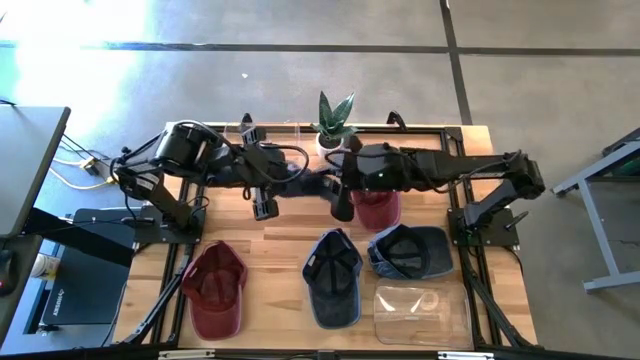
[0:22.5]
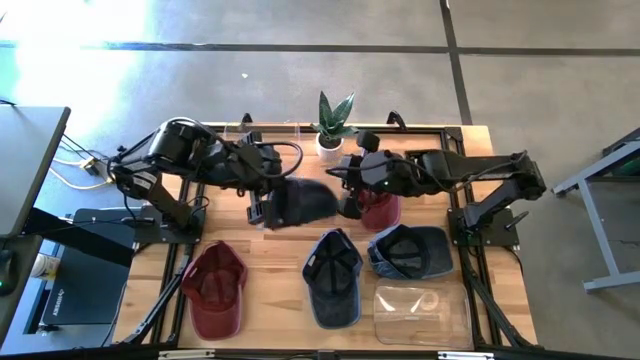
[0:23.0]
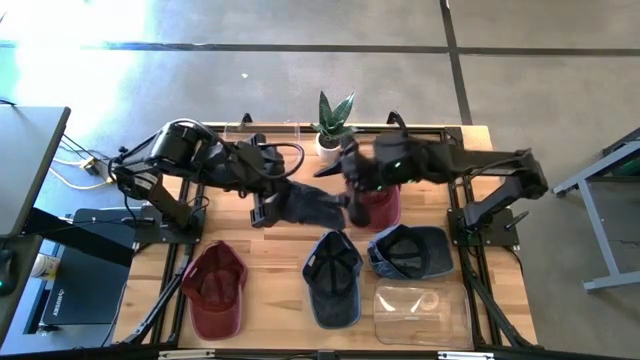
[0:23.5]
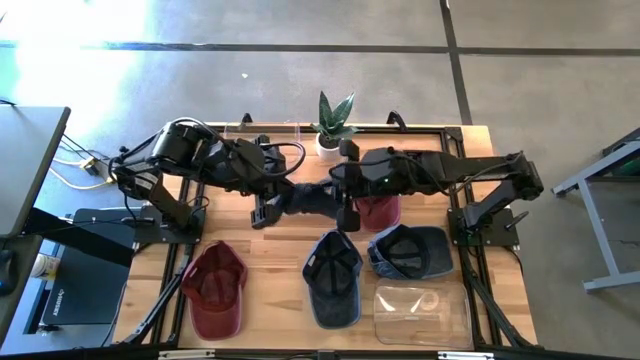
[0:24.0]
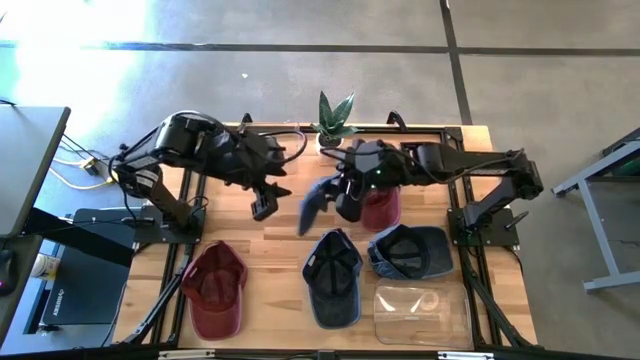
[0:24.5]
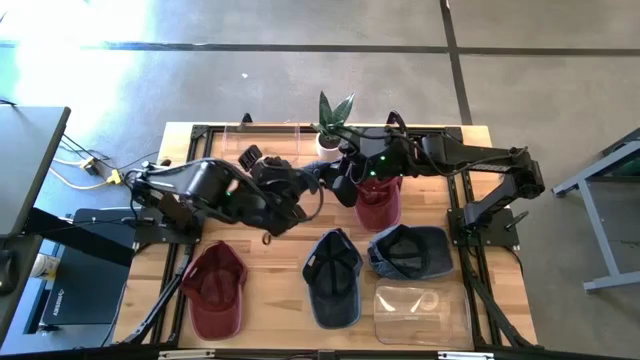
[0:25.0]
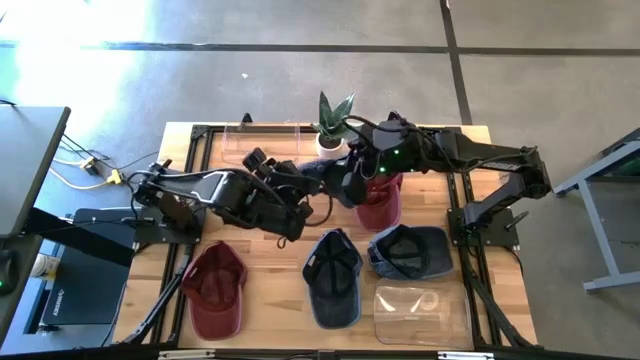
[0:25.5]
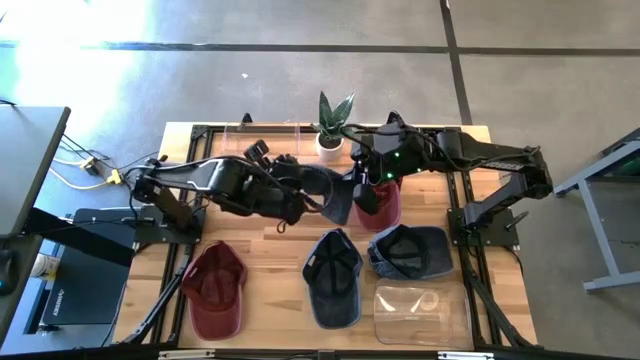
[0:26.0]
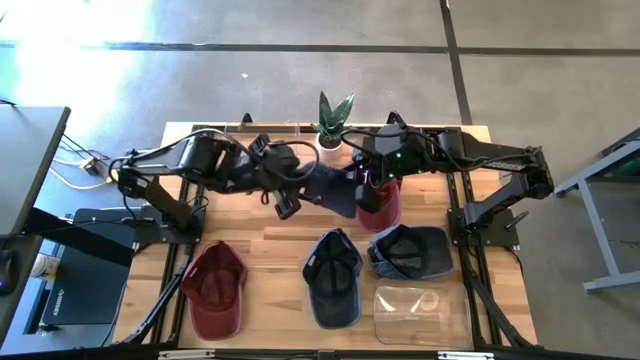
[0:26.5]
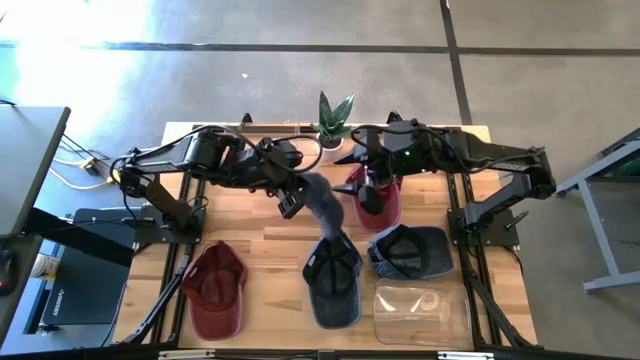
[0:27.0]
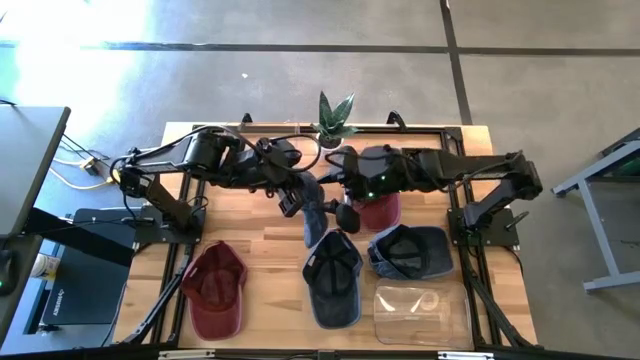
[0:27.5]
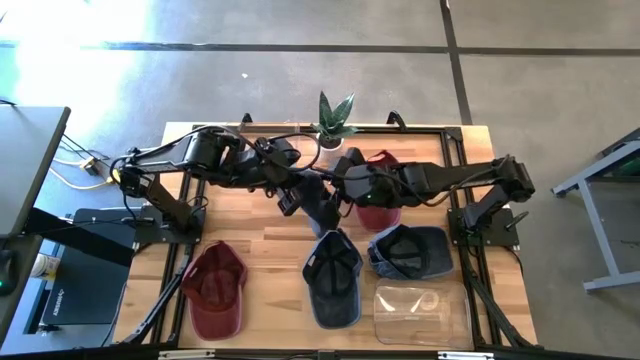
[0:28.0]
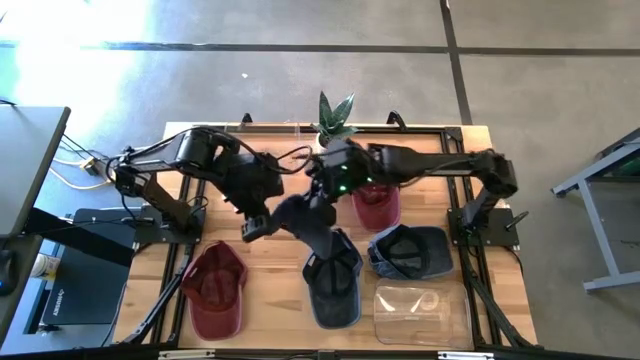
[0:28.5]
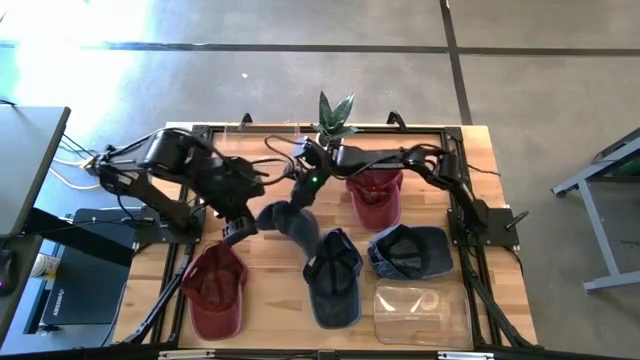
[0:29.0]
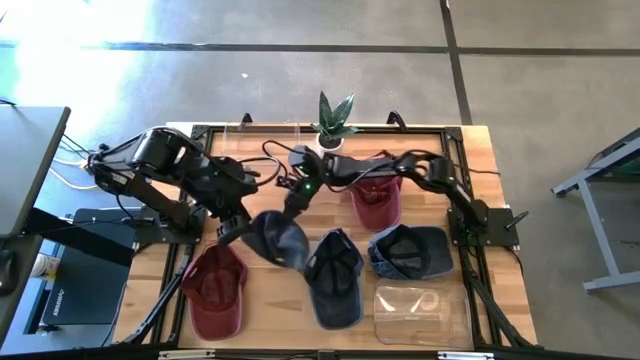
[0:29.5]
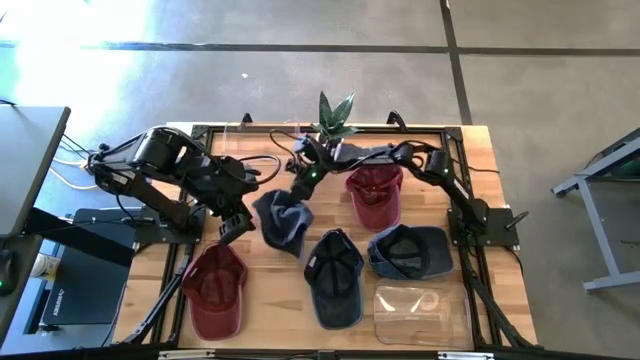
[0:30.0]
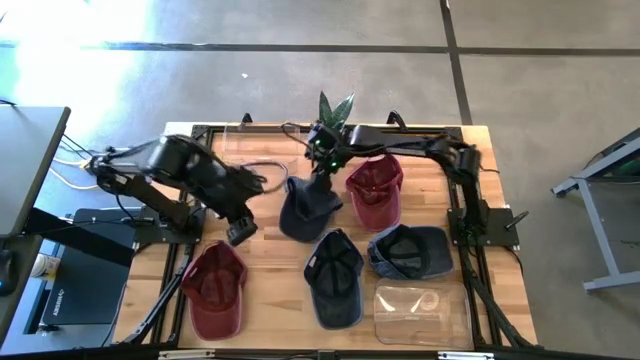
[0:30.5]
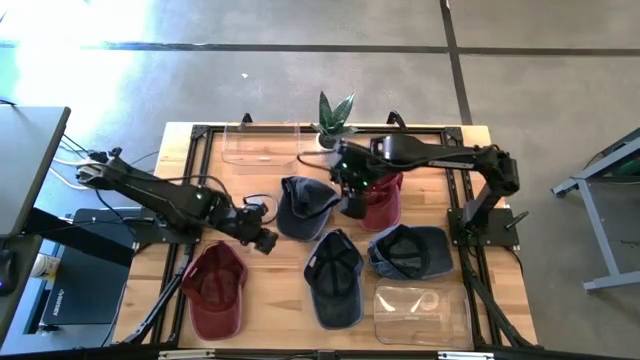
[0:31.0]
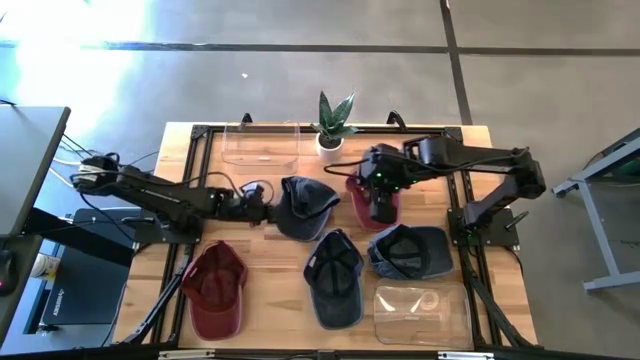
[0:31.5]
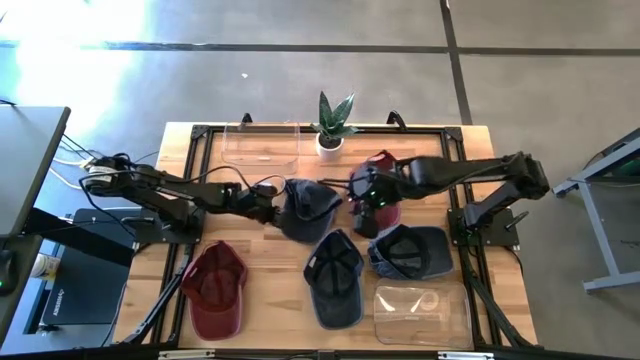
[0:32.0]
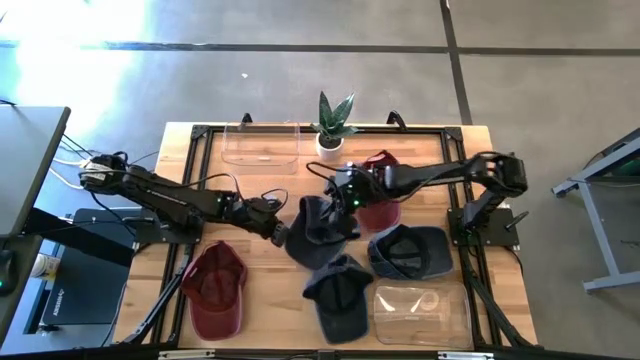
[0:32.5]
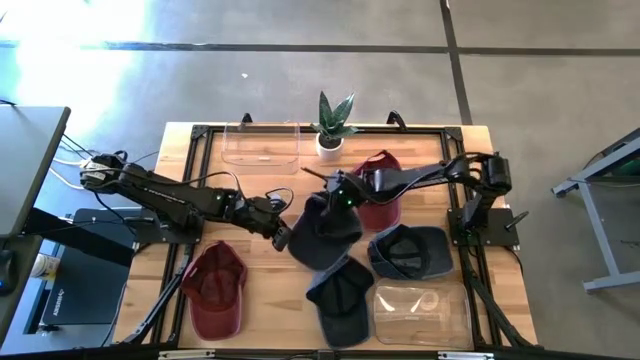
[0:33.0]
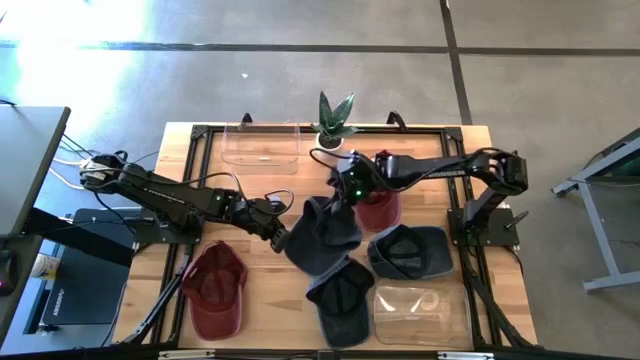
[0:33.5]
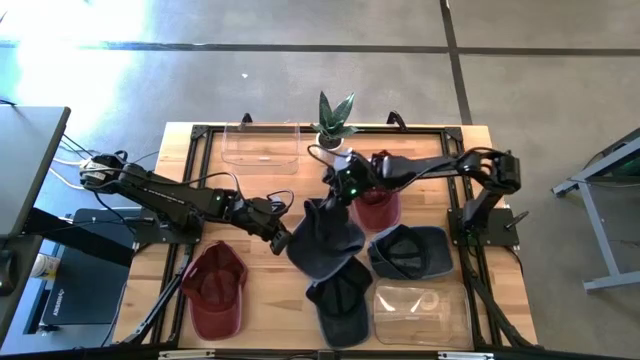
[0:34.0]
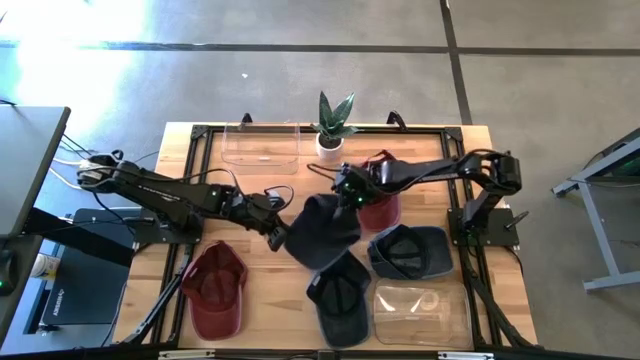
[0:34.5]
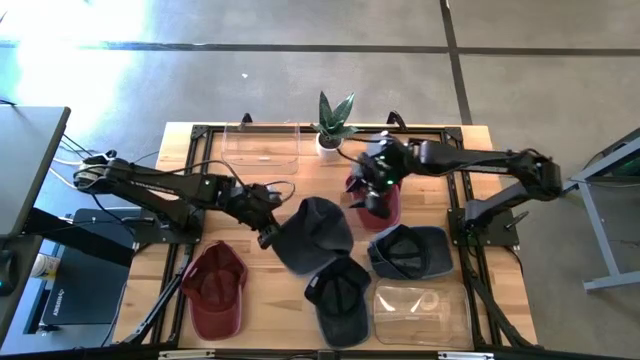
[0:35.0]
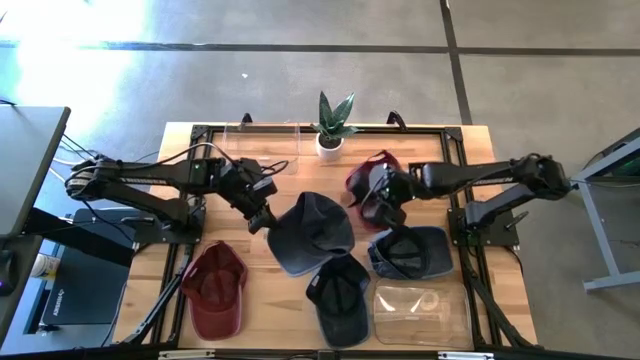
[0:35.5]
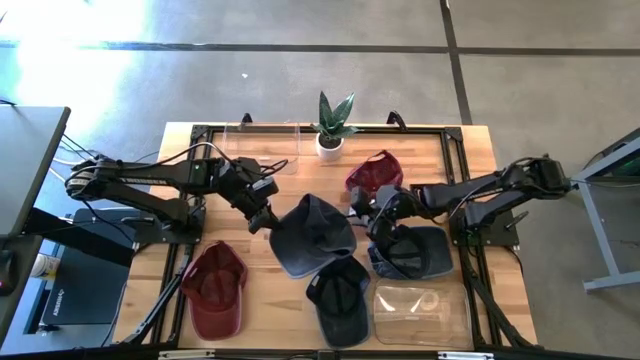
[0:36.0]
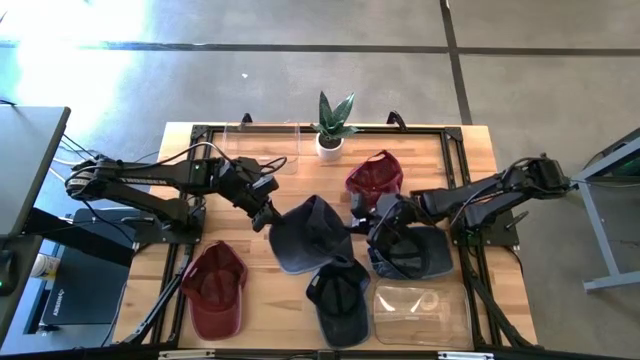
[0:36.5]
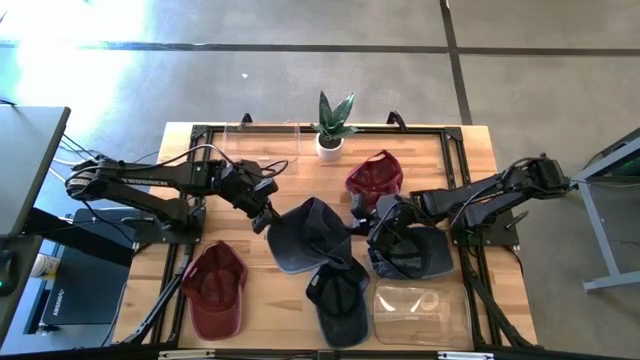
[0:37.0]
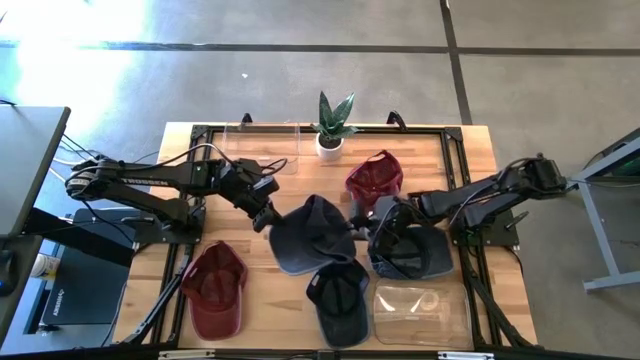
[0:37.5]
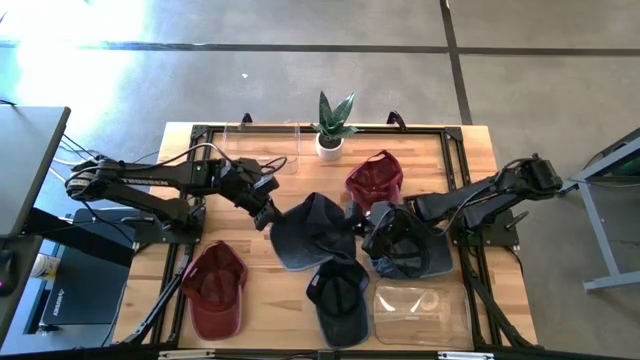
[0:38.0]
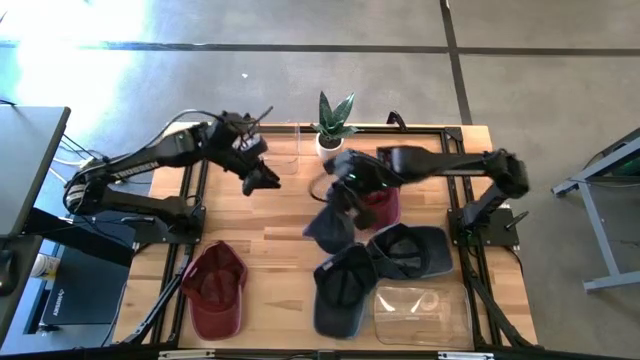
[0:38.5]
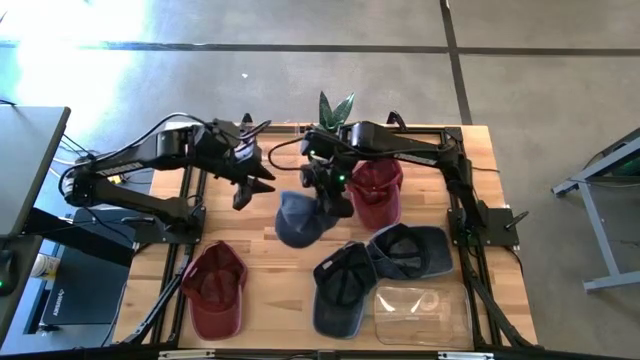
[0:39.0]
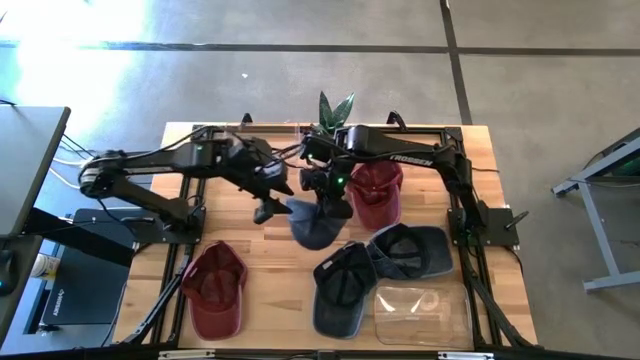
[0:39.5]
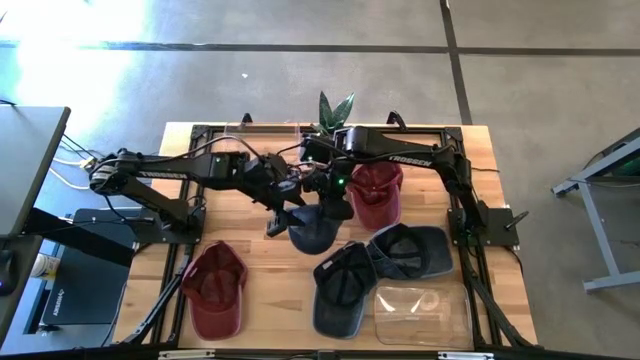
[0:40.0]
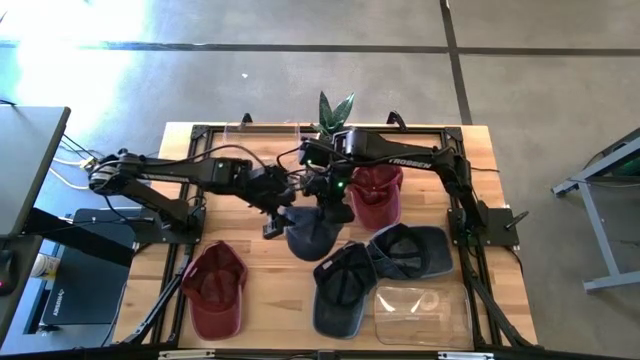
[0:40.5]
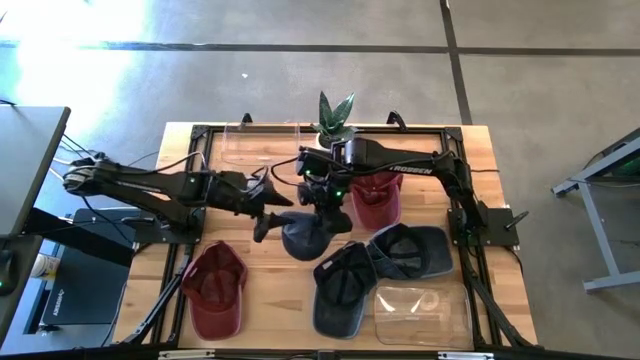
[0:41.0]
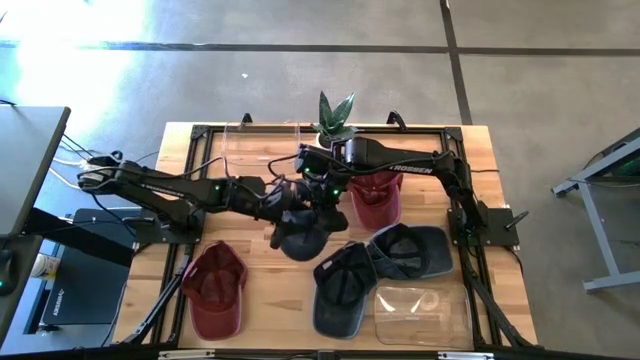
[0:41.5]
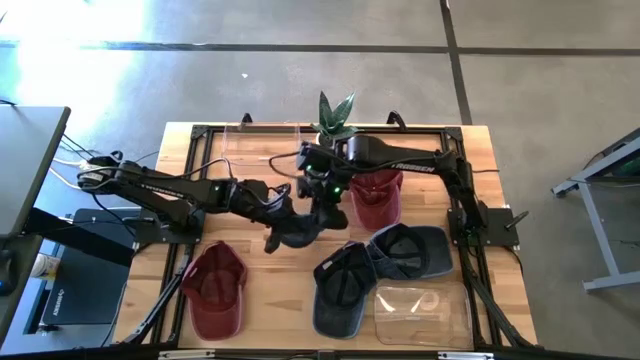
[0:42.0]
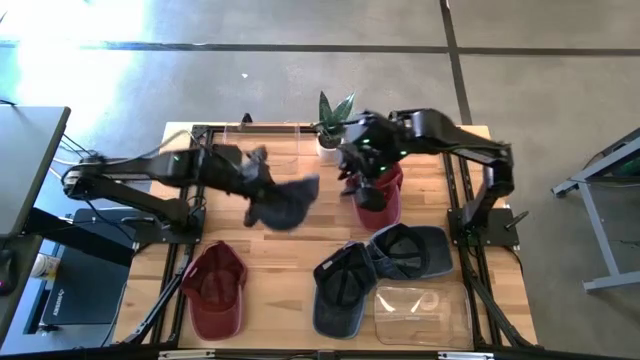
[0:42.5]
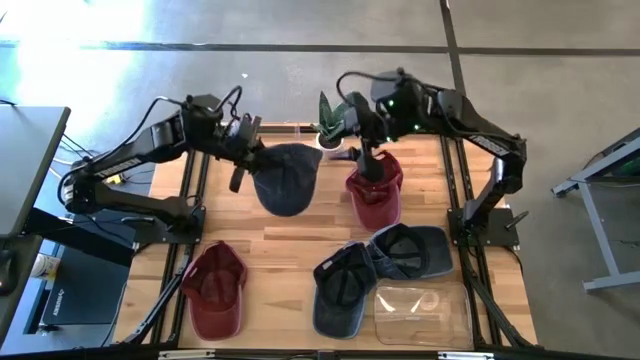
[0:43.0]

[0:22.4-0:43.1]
Task: Pick & Place hat
Put the left blue cap into the top transparent bin
